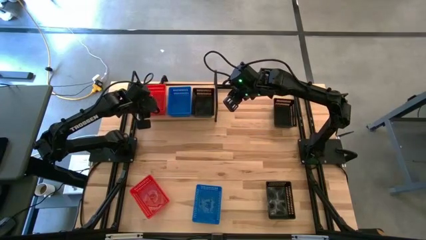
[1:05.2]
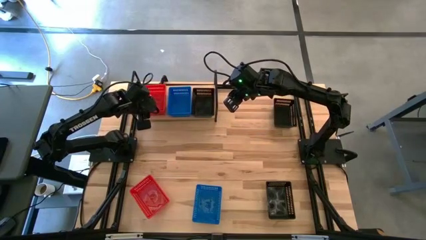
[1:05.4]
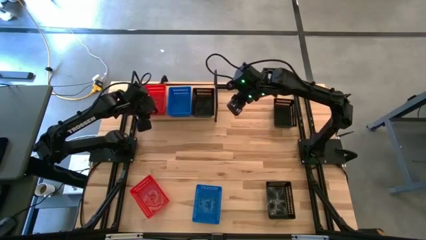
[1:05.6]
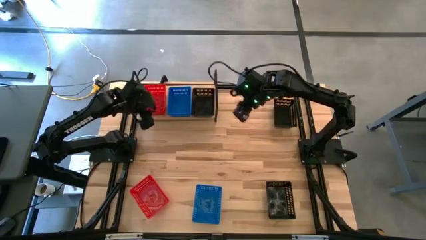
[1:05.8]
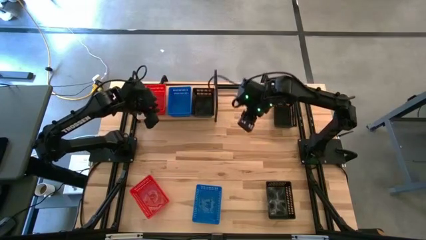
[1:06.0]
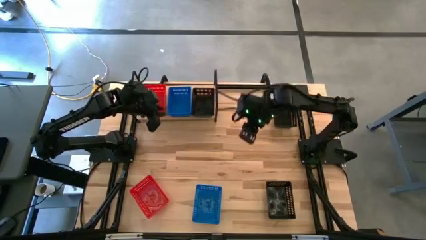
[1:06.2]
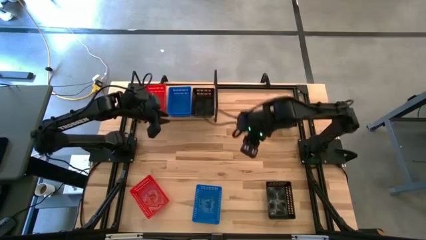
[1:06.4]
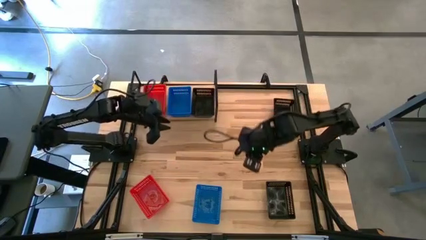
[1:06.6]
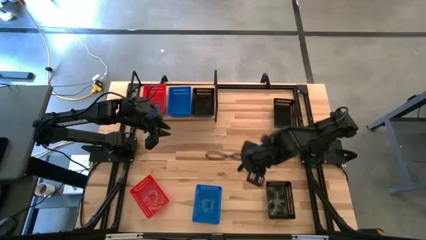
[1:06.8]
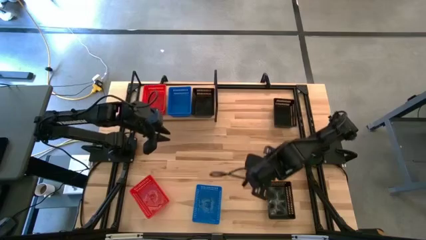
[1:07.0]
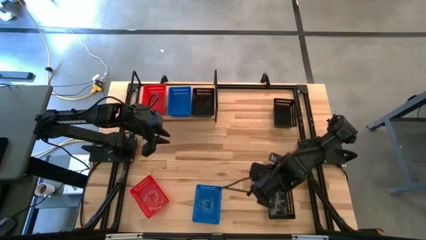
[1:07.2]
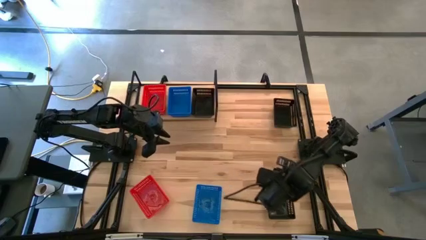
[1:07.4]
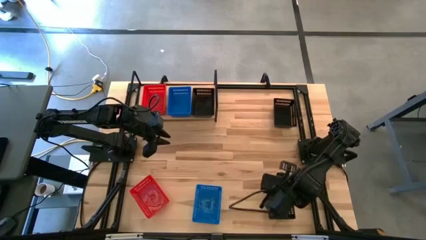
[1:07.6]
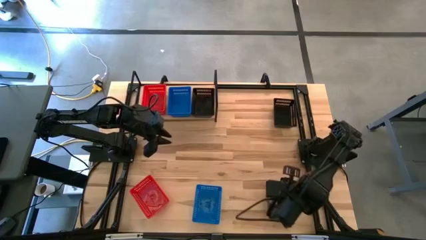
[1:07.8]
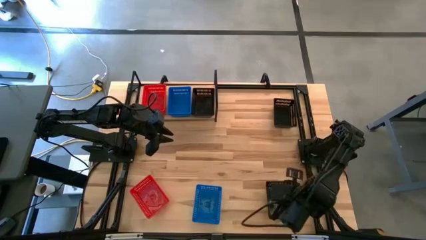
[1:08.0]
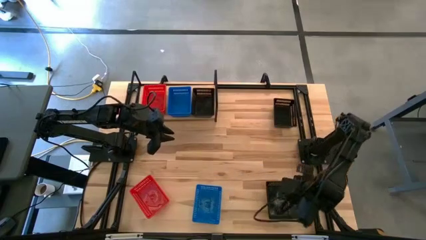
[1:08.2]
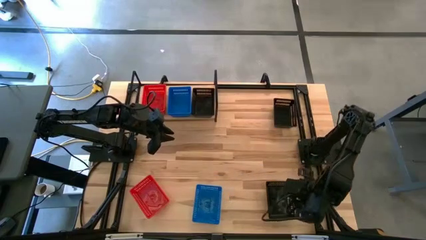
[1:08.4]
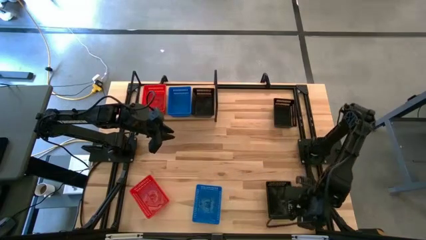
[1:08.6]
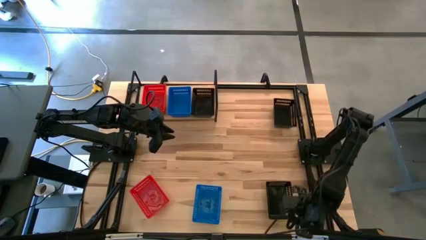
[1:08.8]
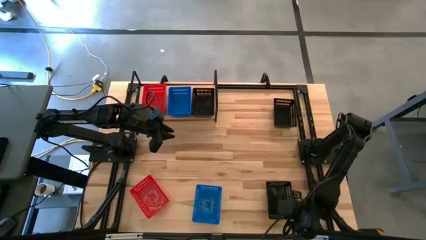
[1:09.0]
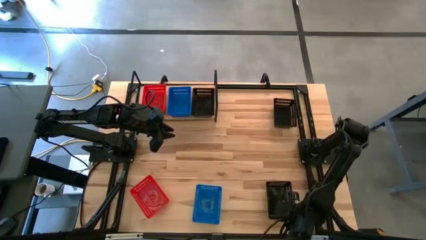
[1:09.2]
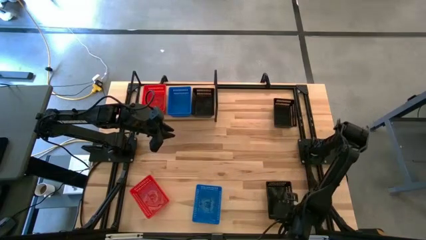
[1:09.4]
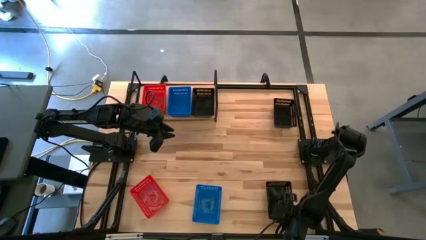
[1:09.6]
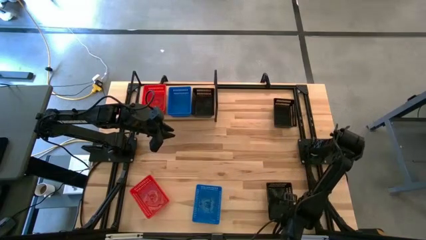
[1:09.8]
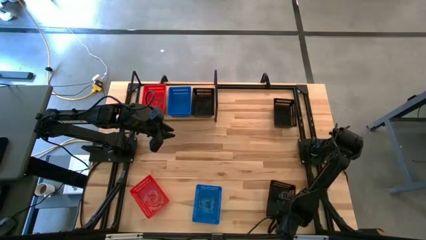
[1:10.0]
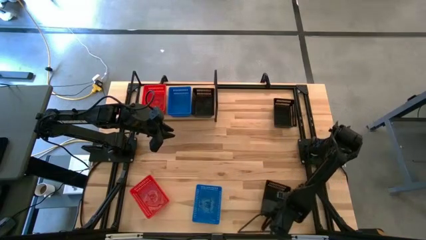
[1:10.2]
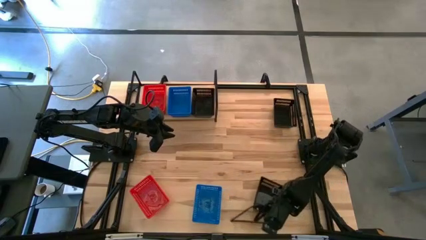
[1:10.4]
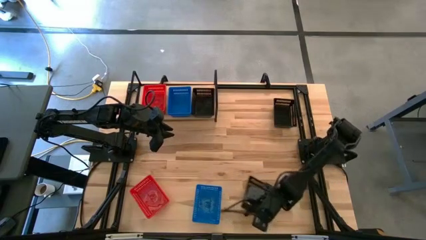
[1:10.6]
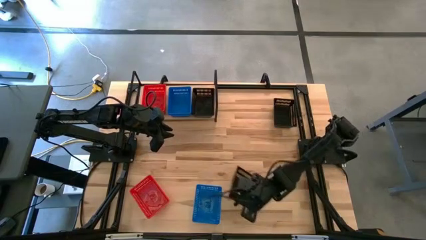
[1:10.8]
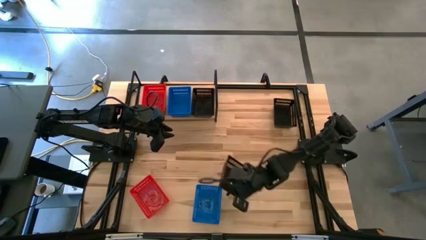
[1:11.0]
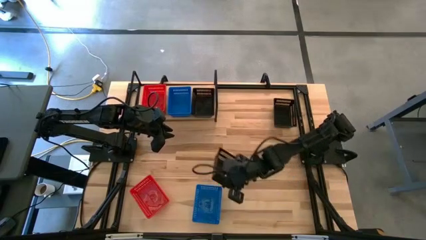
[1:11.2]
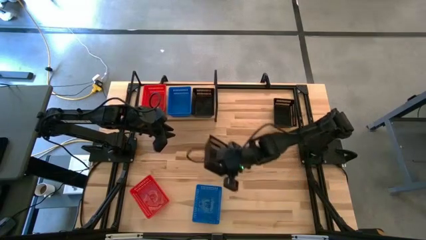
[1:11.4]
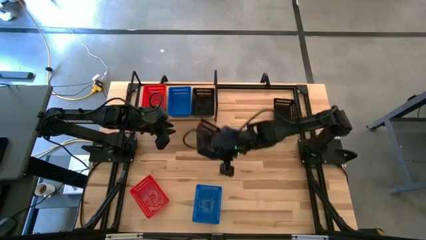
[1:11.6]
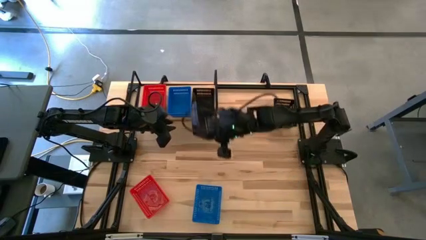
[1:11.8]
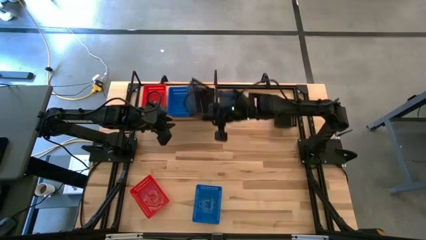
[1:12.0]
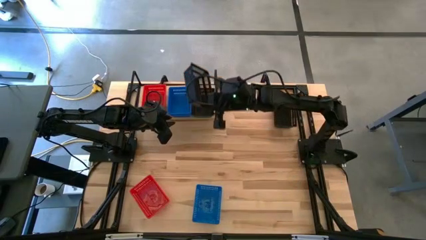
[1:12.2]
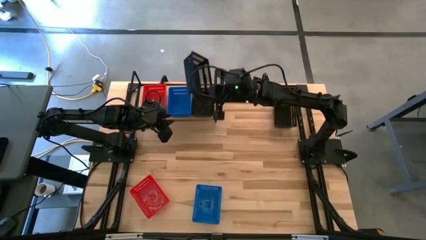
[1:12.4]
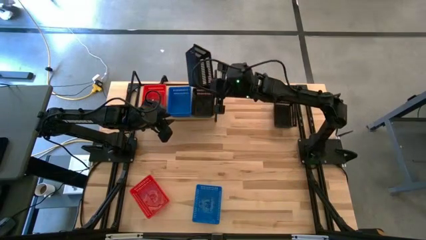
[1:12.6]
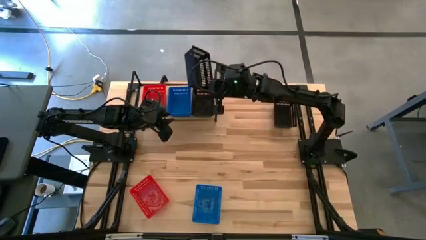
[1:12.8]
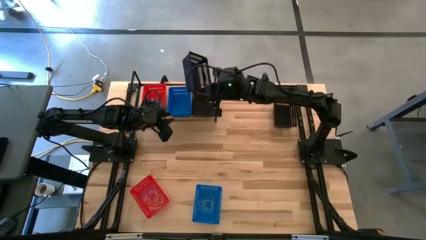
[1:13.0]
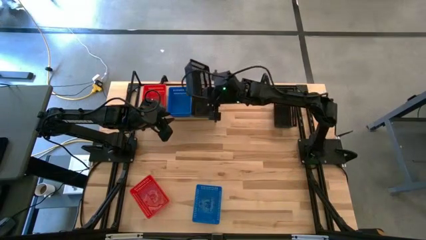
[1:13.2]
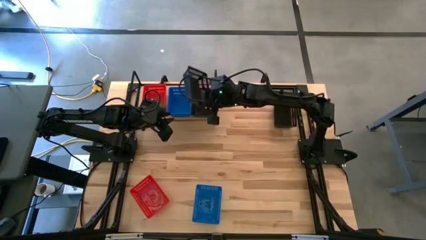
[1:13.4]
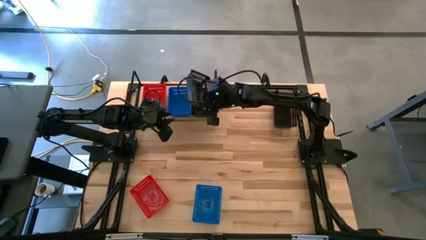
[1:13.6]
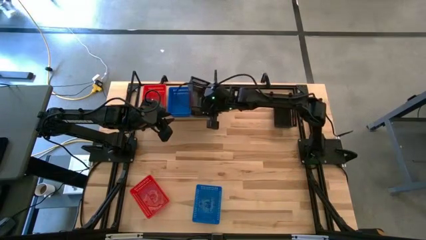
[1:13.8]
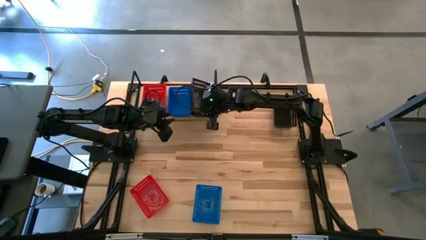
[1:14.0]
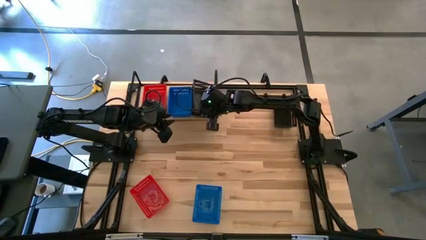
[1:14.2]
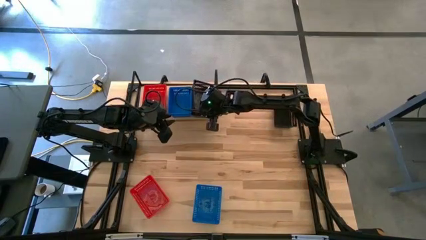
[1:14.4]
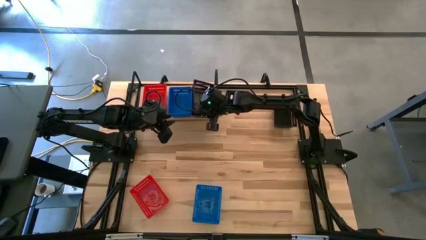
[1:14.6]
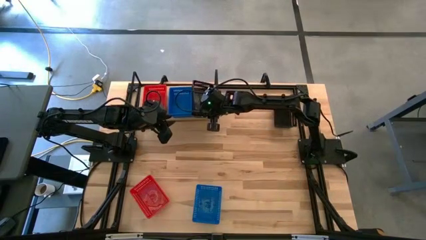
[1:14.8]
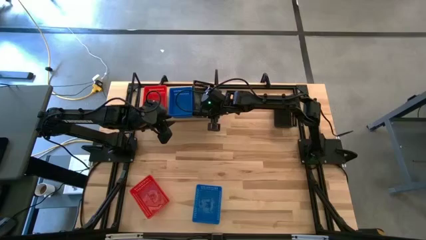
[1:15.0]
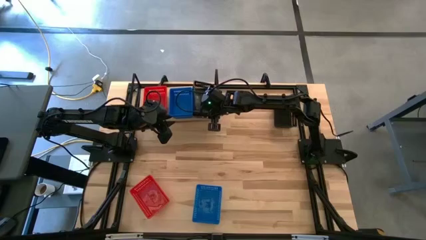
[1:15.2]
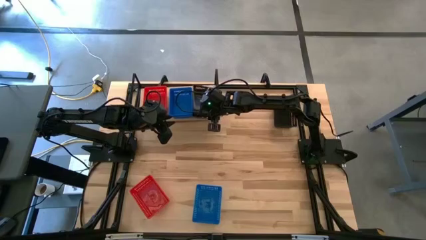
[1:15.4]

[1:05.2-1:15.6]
Task: Stack baskets on shelf by color
Stack the bottom black bin on the other black bin

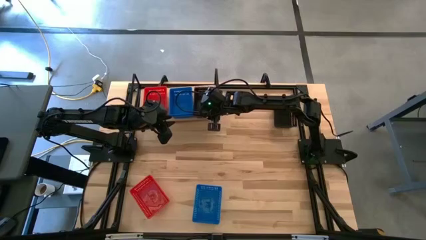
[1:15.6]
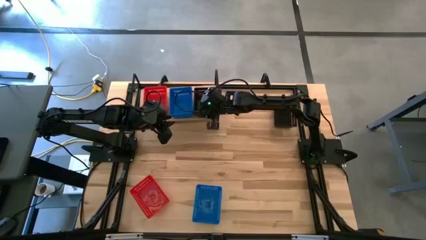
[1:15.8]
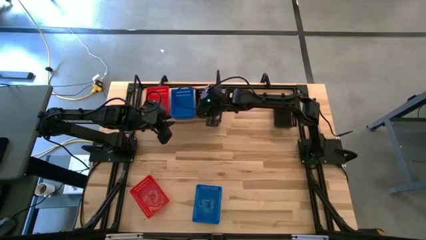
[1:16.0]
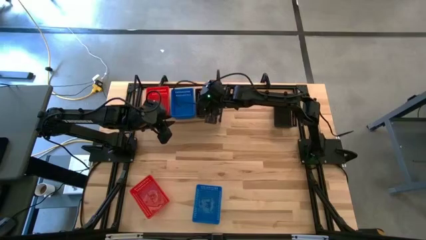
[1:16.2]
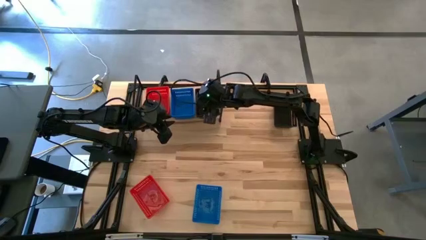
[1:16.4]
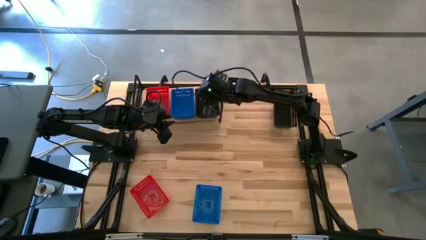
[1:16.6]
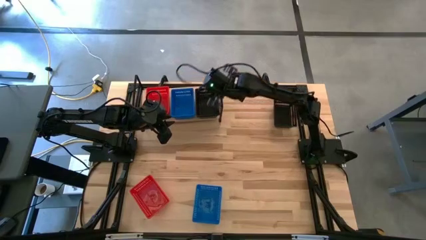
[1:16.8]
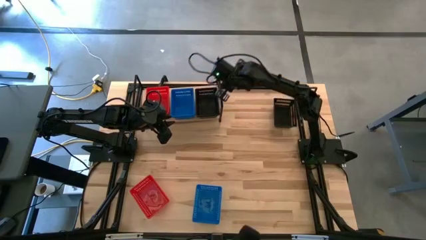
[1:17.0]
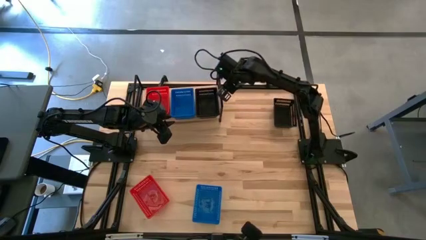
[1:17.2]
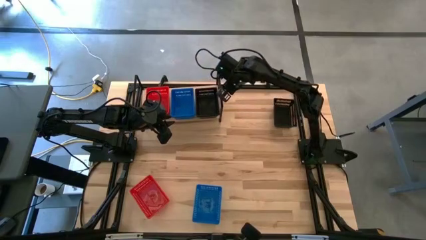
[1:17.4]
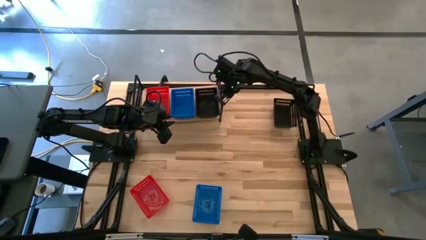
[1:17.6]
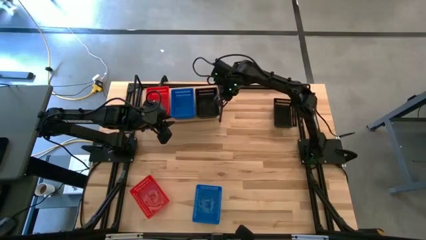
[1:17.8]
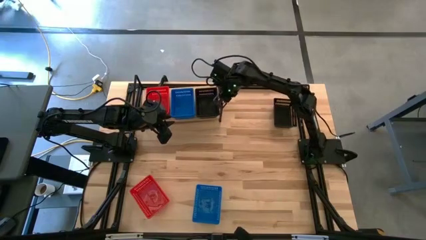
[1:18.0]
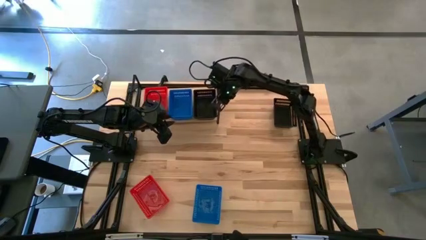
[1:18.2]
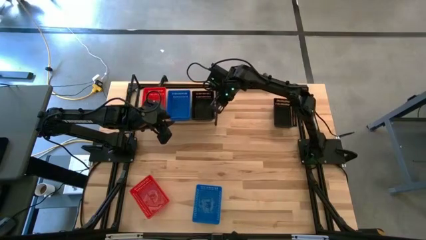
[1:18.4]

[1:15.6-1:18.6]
Adjust the shelf
